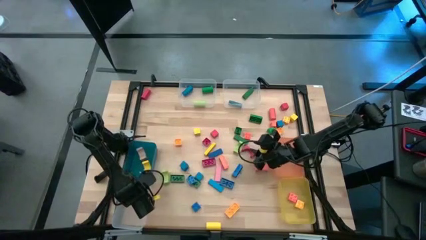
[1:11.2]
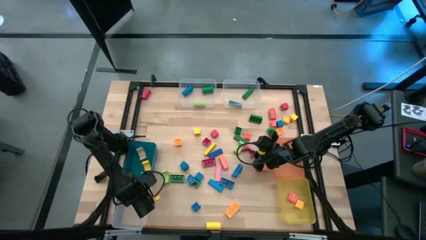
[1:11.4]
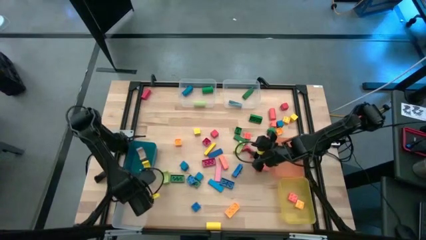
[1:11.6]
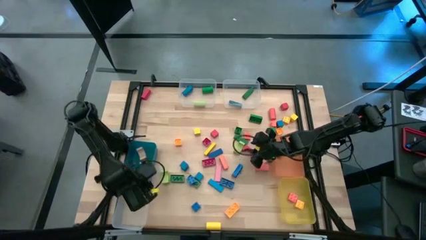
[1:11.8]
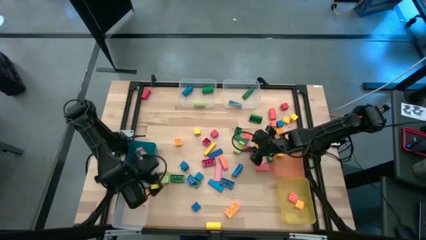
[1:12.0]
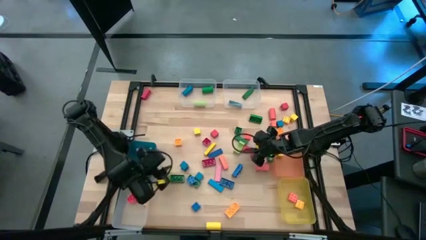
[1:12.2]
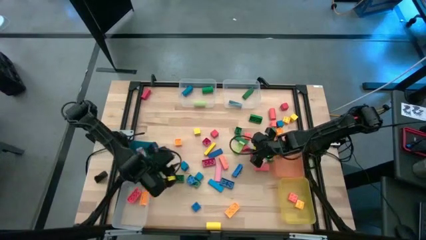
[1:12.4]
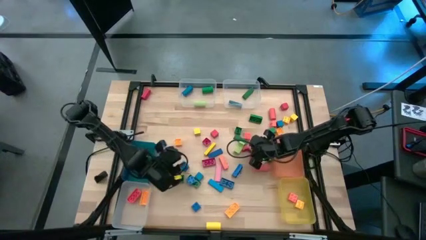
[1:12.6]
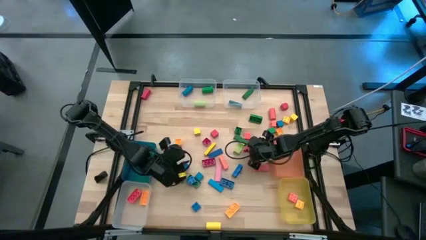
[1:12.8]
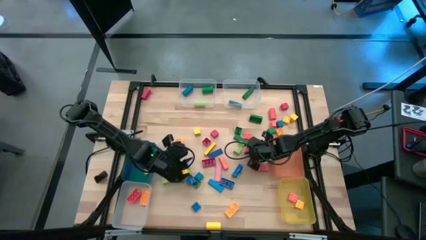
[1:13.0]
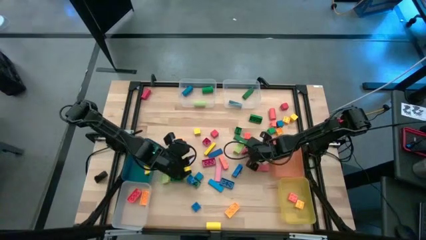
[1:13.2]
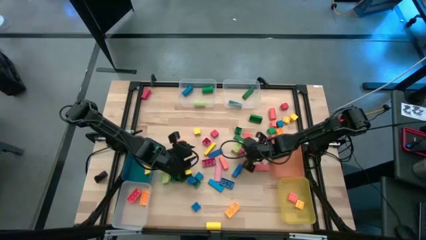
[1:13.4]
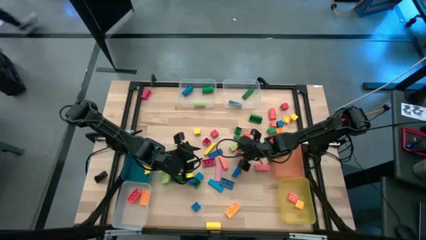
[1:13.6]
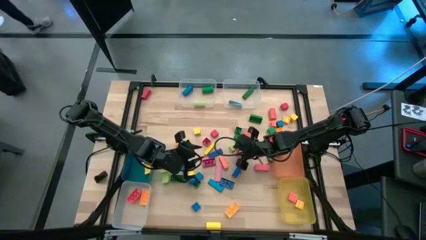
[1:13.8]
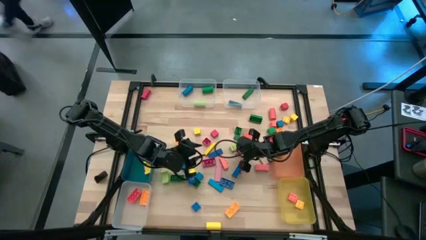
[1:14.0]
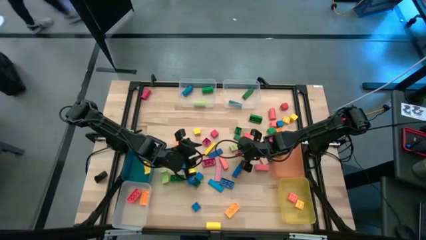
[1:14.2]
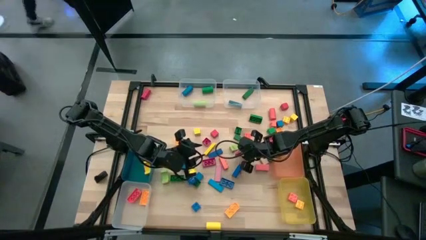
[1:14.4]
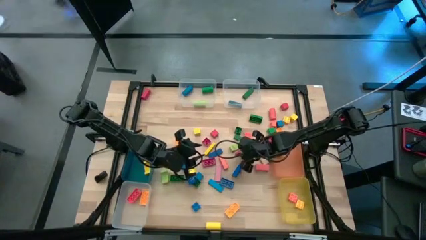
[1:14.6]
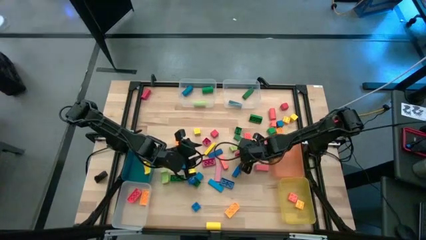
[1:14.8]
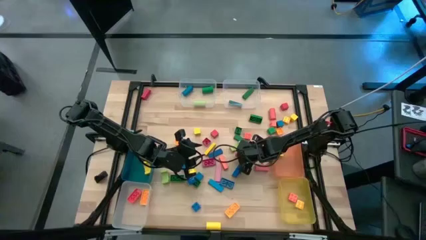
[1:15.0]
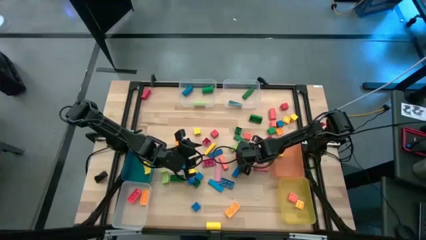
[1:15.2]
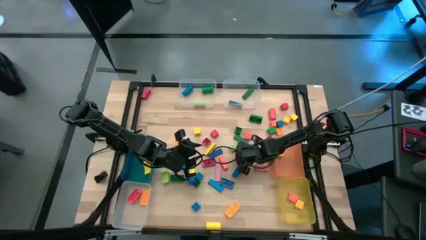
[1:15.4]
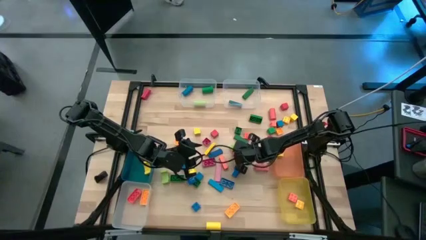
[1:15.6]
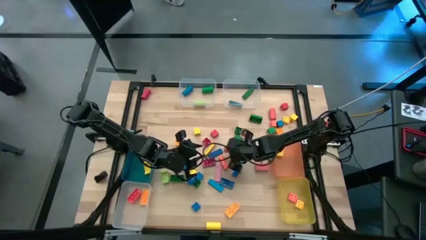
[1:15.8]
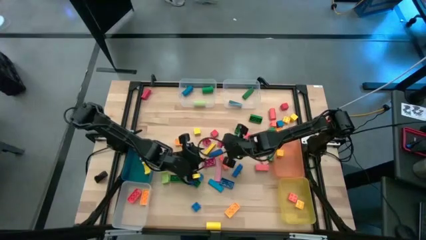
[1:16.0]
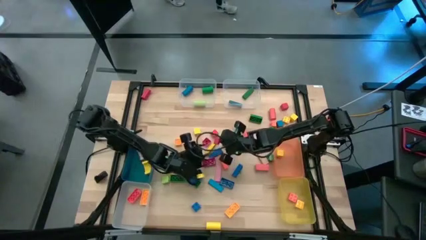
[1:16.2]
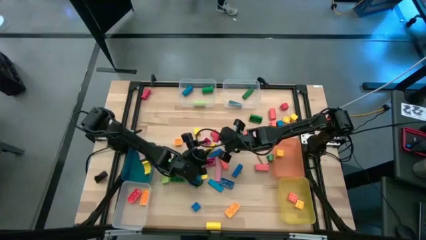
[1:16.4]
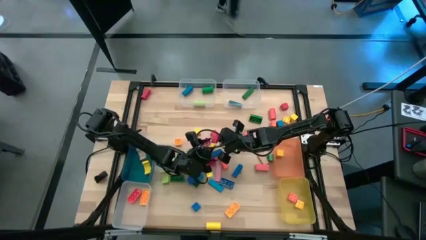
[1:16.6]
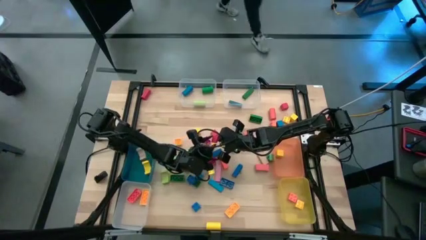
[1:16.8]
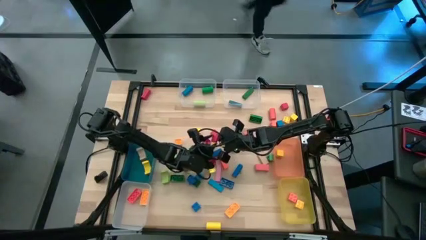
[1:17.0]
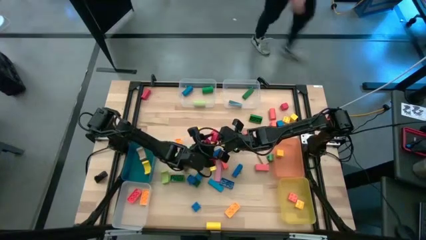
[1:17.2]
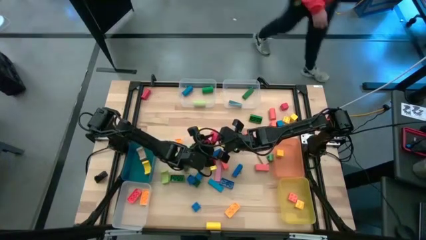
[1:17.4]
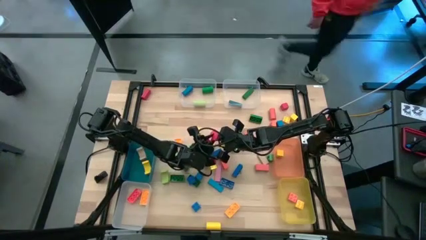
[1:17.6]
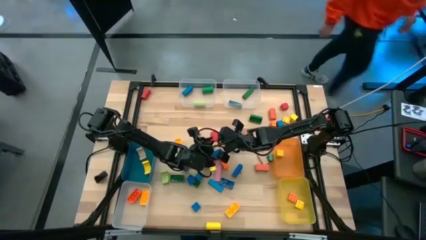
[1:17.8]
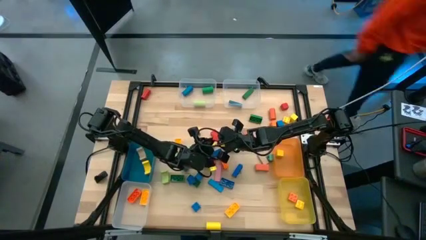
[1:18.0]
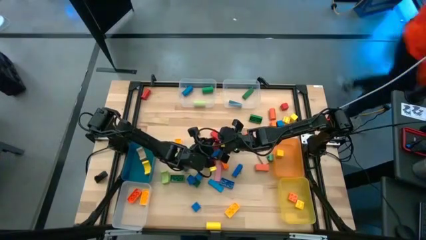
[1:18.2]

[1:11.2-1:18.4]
Task: Sort blocks by size
Put the red block into the blue bin

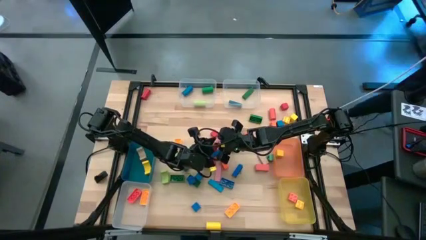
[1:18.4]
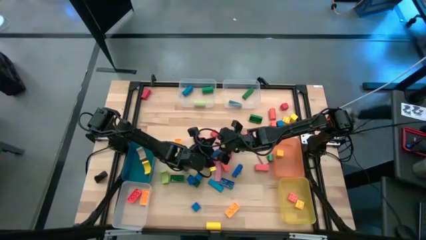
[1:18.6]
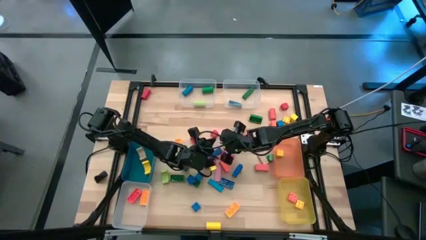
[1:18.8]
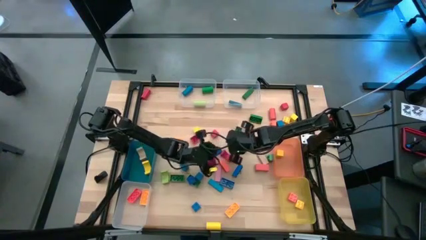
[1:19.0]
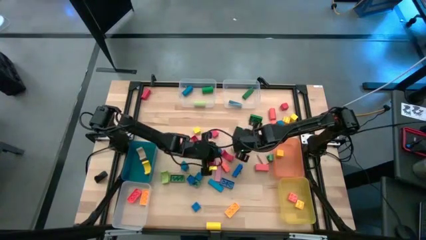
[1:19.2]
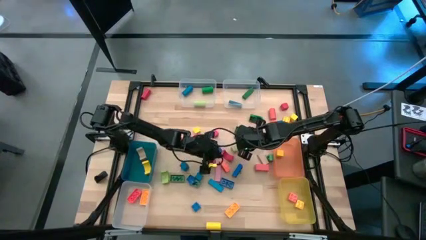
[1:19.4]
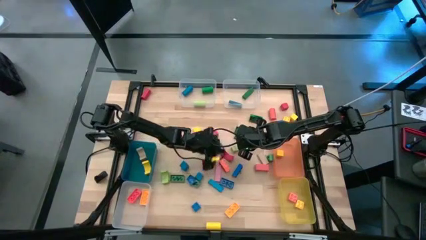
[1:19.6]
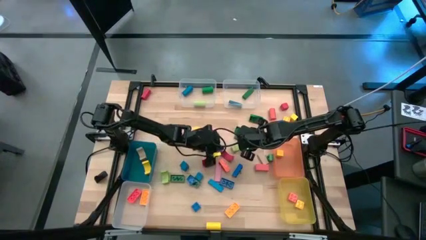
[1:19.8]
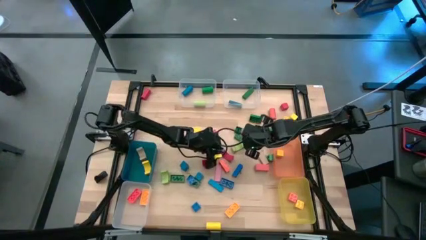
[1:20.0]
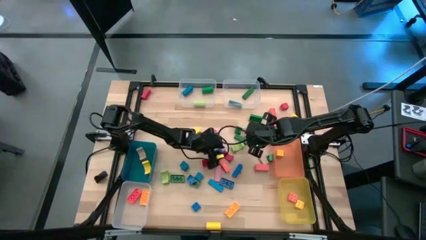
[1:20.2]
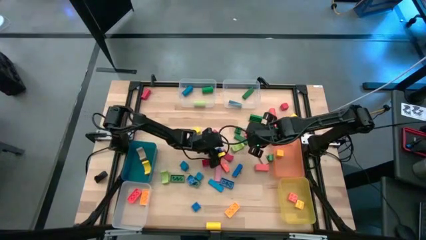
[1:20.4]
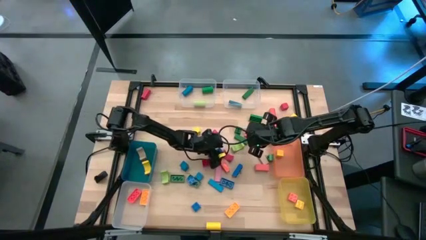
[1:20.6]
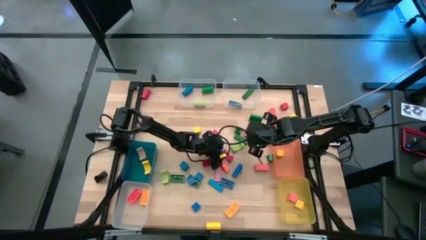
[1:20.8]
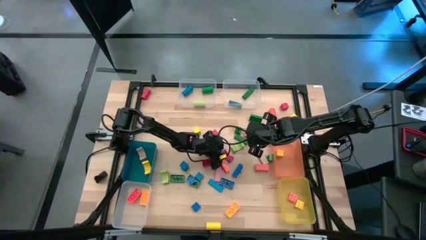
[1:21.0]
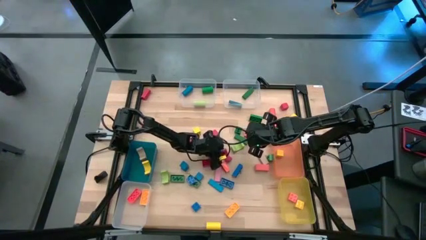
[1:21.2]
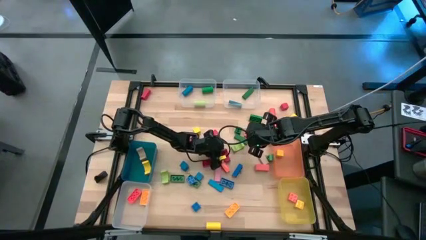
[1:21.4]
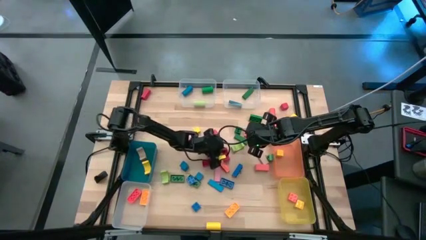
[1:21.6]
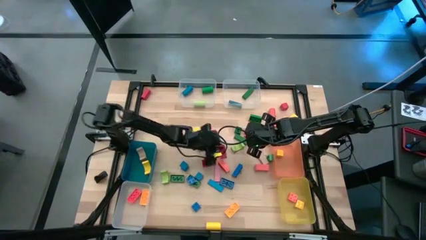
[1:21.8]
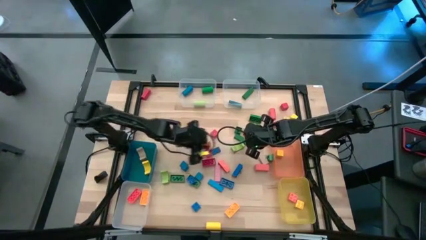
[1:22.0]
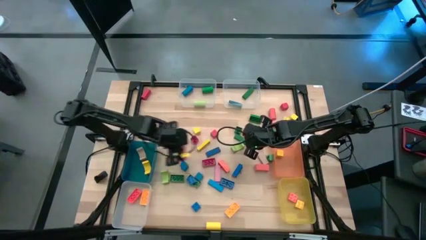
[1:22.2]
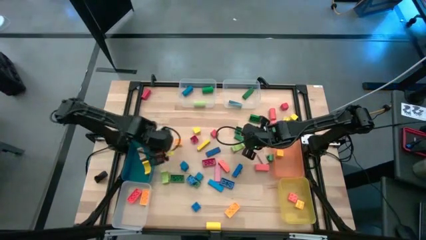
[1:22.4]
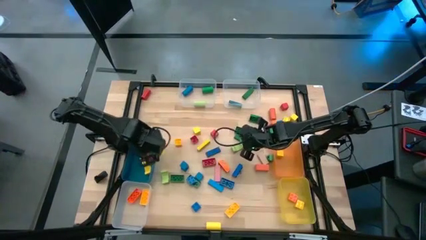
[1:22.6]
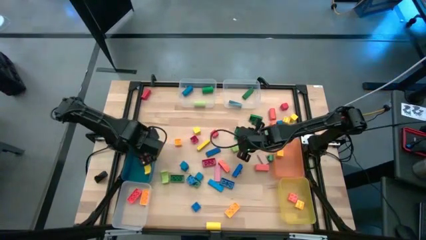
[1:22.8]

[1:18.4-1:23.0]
Put the red block into the blue bin

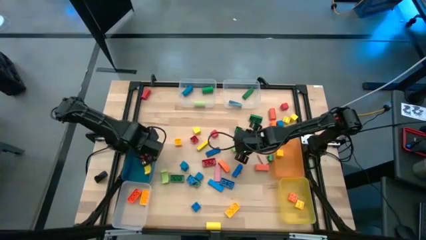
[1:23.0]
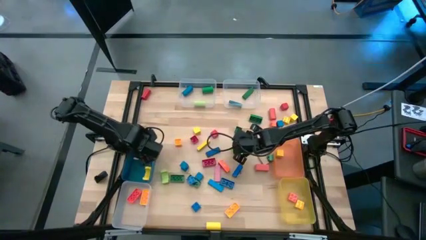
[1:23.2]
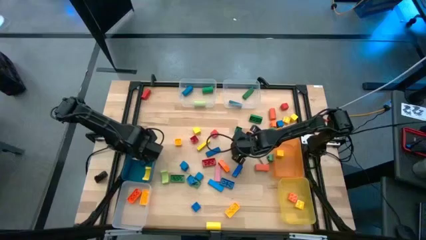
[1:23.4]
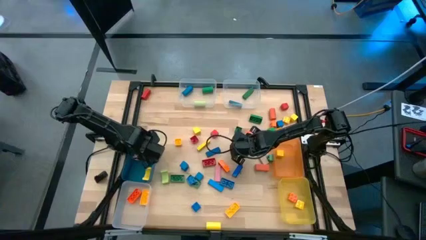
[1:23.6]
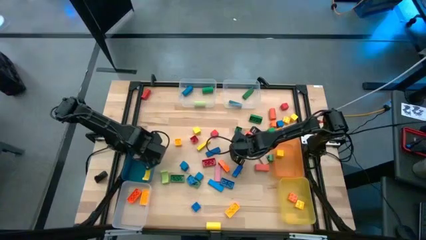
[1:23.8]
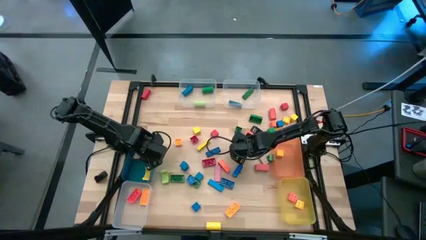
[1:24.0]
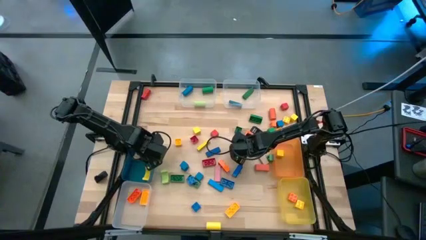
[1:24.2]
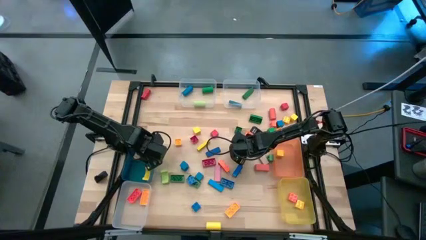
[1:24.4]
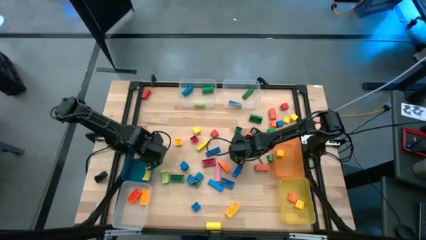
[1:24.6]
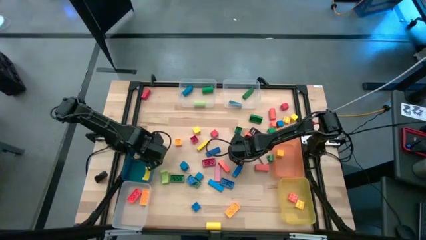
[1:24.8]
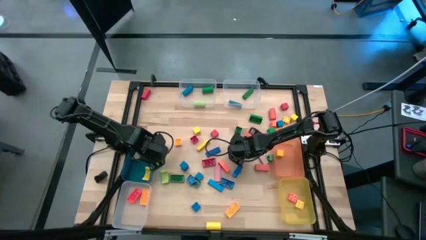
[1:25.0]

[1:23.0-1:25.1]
Put the light green block into the blue bin

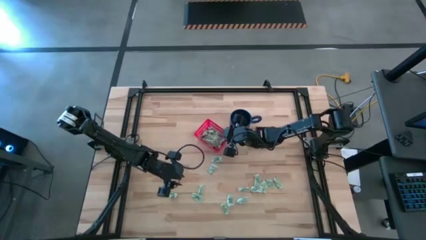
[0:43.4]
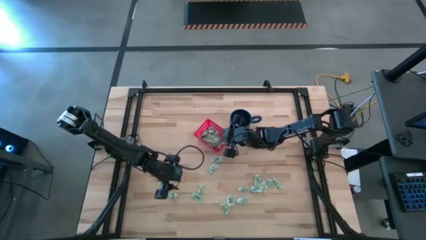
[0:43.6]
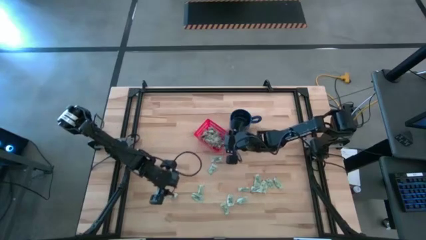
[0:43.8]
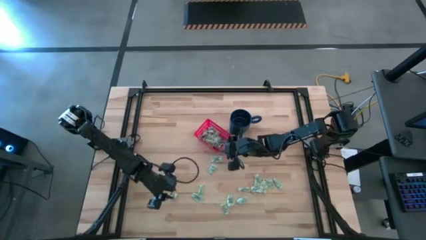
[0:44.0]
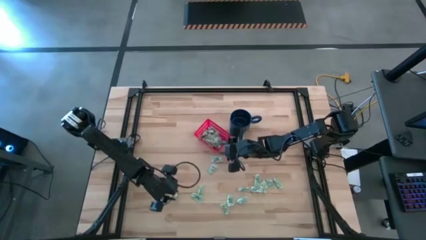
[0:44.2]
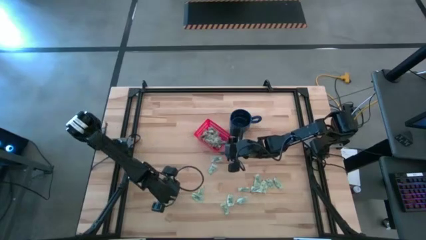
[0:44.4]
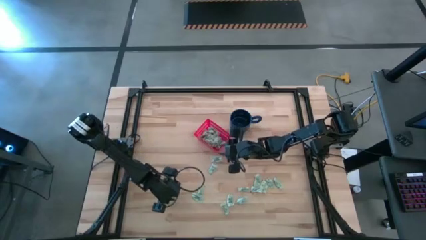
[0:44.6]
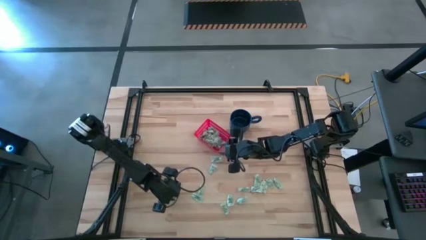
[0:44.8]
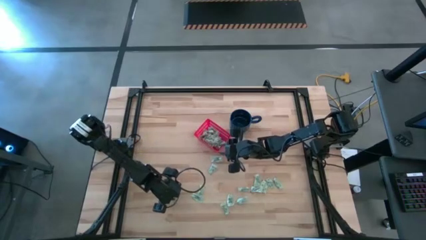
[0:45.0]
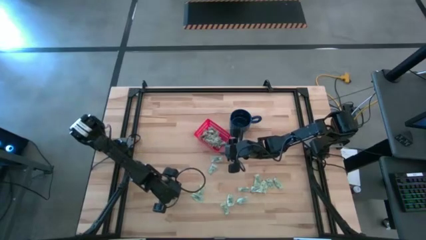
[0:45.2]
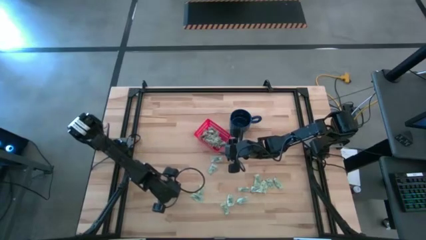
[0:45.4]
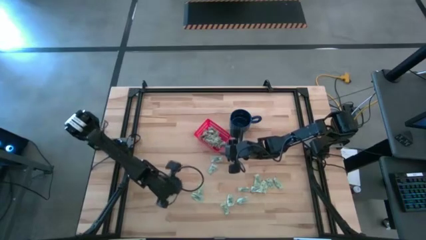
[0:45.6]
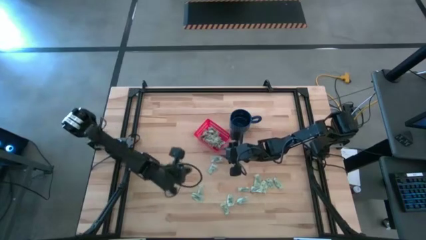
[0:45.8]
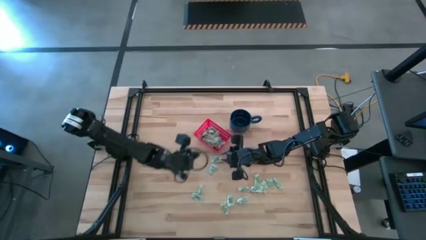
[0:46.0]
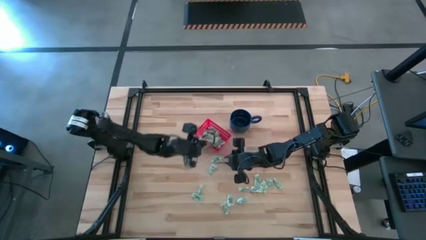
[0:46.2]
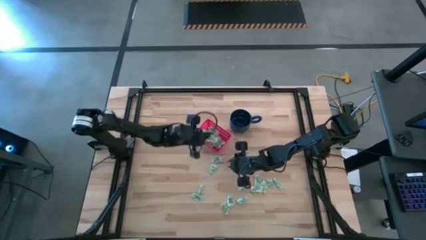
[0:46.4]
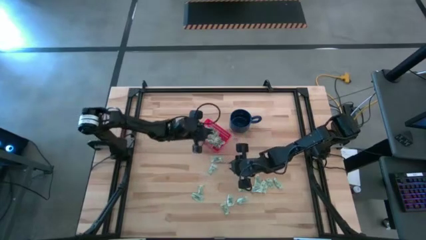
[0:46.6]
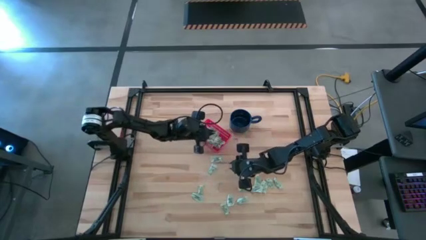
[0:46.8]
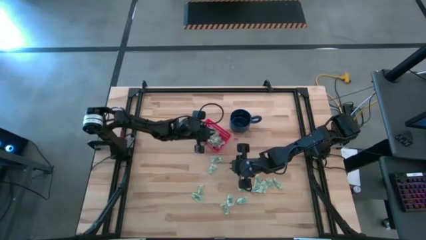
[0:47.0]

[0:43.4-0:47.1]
Task: Pick and place items into bin
Put the stevia packet into the bin
